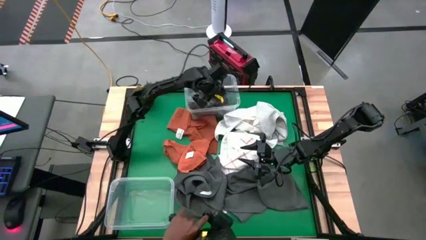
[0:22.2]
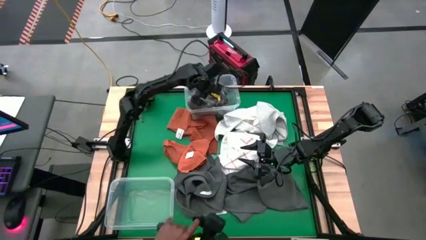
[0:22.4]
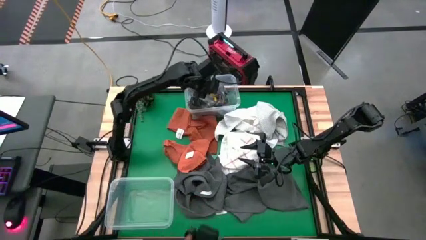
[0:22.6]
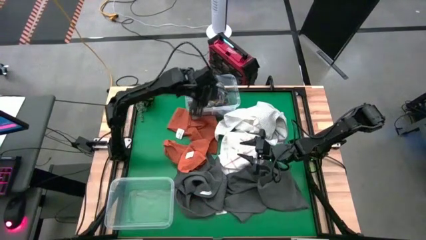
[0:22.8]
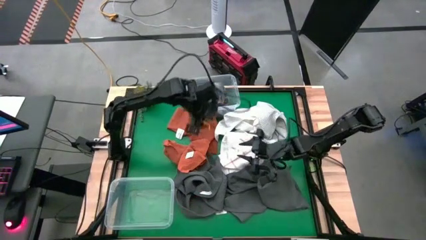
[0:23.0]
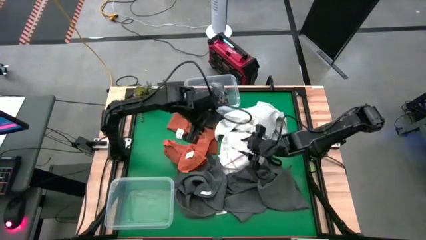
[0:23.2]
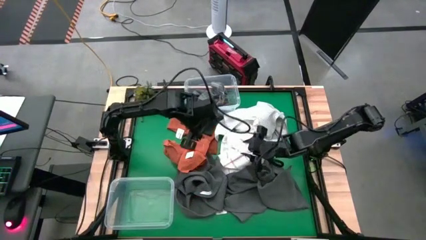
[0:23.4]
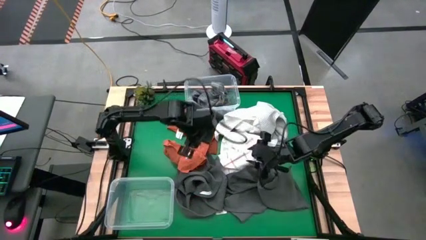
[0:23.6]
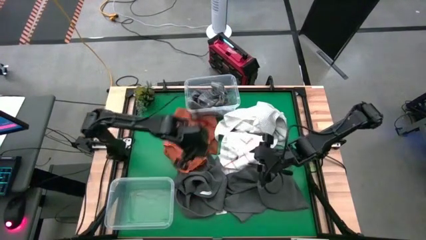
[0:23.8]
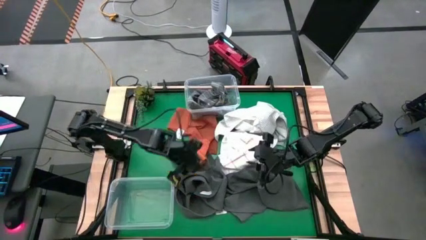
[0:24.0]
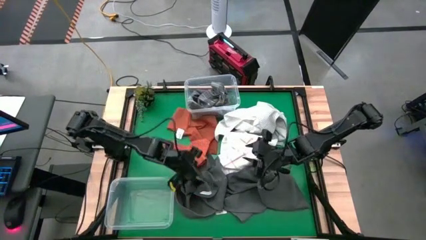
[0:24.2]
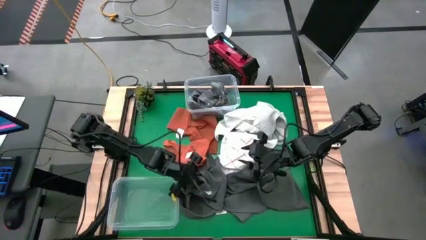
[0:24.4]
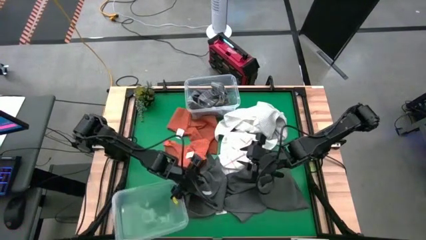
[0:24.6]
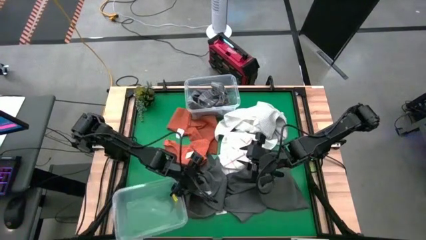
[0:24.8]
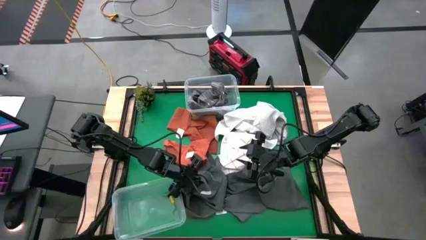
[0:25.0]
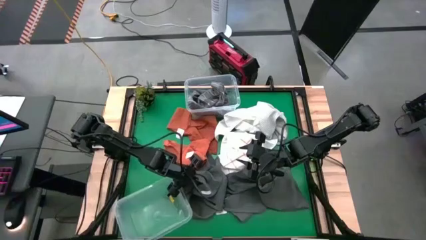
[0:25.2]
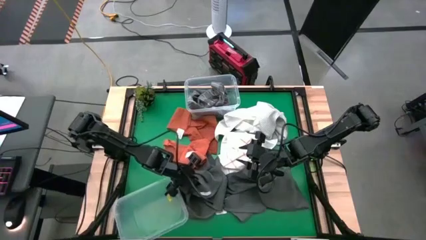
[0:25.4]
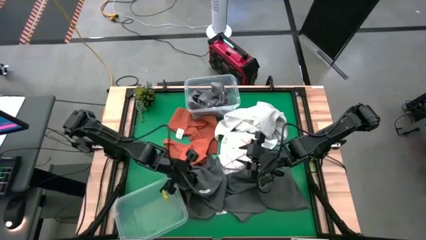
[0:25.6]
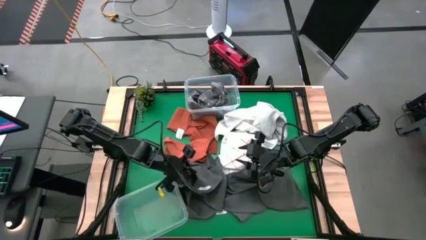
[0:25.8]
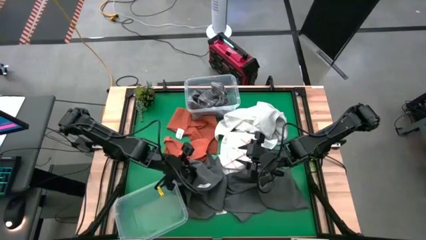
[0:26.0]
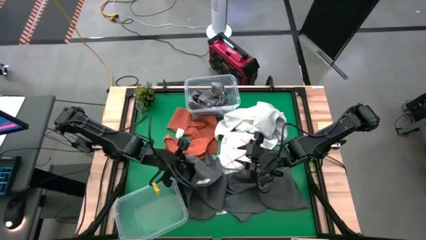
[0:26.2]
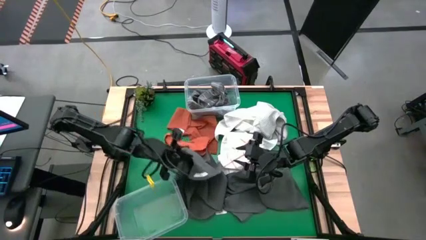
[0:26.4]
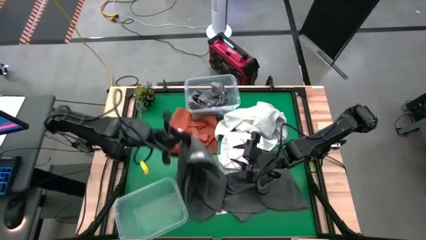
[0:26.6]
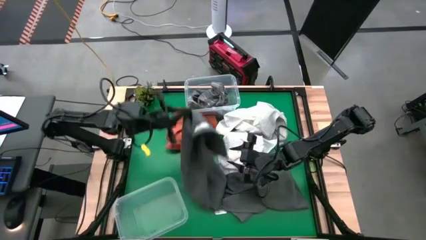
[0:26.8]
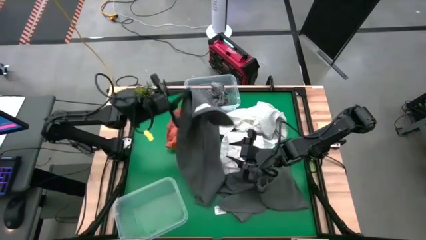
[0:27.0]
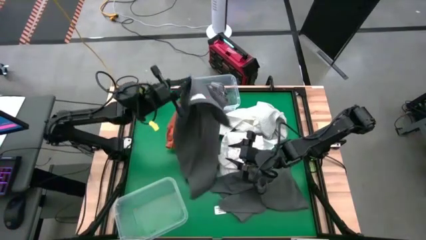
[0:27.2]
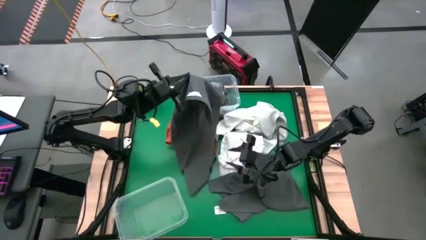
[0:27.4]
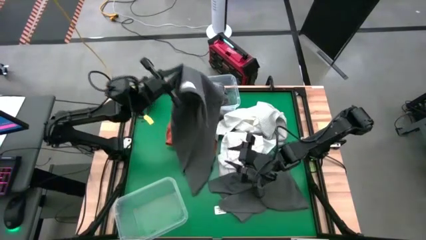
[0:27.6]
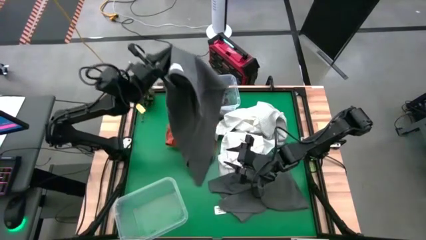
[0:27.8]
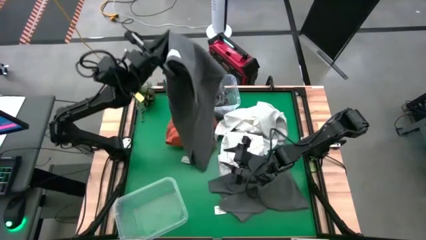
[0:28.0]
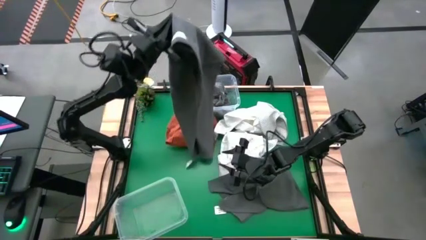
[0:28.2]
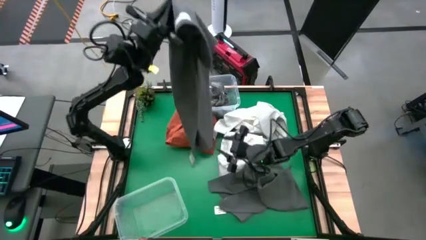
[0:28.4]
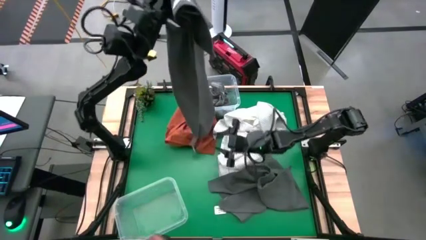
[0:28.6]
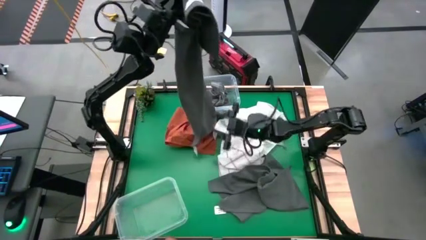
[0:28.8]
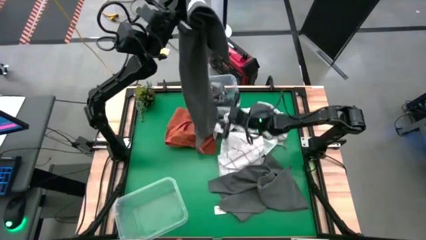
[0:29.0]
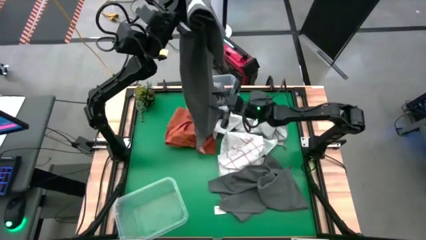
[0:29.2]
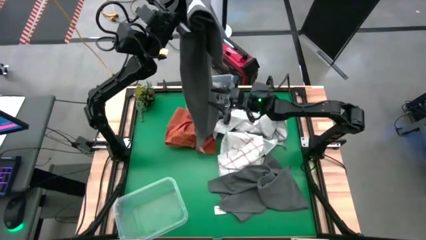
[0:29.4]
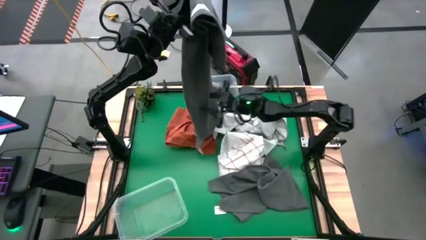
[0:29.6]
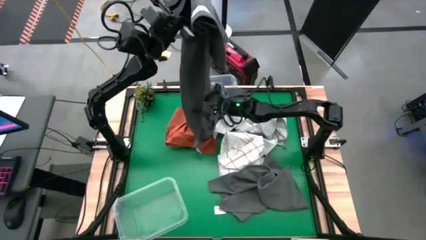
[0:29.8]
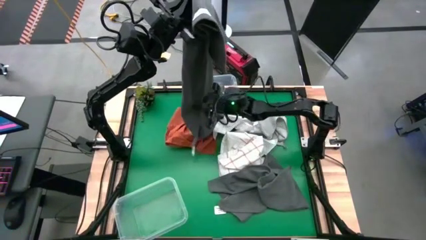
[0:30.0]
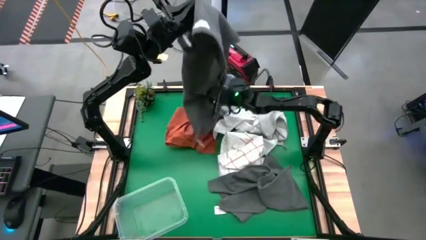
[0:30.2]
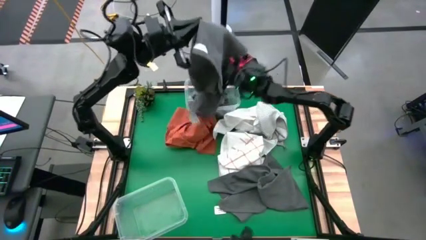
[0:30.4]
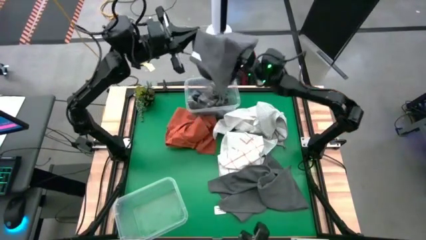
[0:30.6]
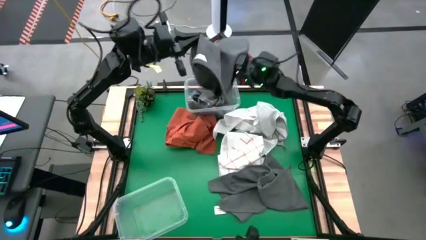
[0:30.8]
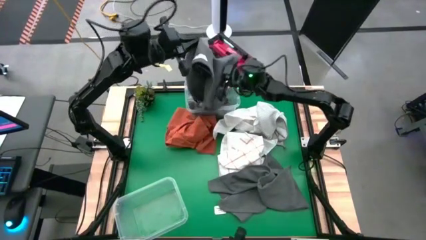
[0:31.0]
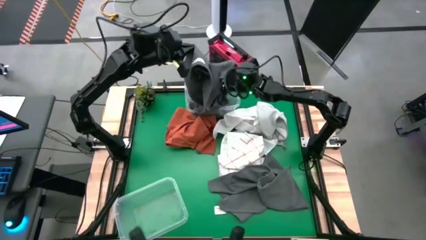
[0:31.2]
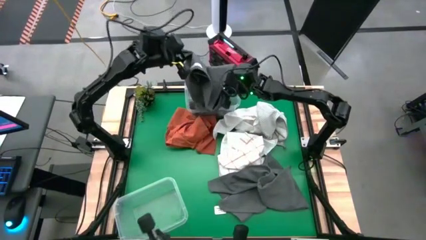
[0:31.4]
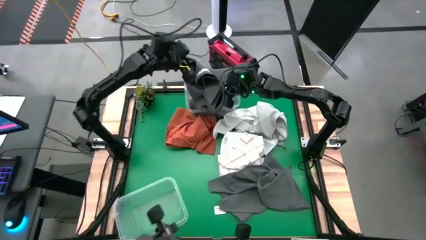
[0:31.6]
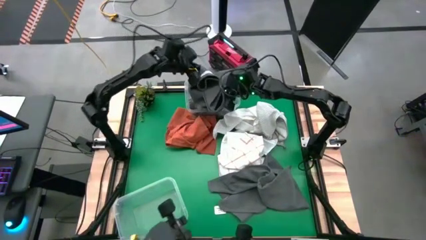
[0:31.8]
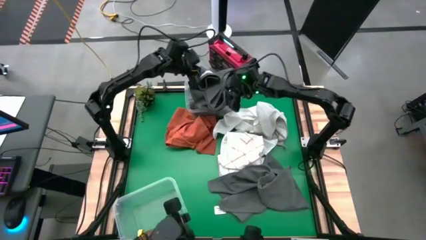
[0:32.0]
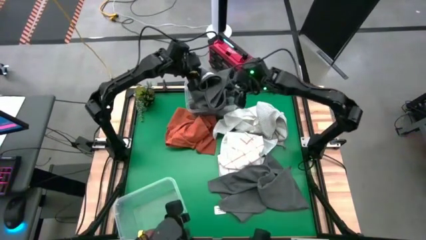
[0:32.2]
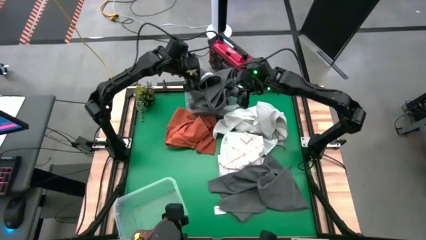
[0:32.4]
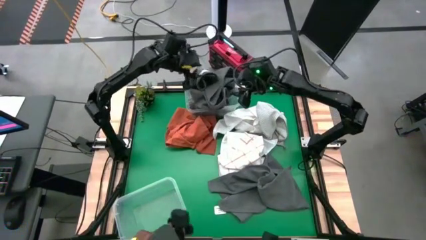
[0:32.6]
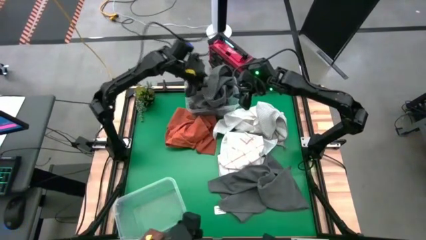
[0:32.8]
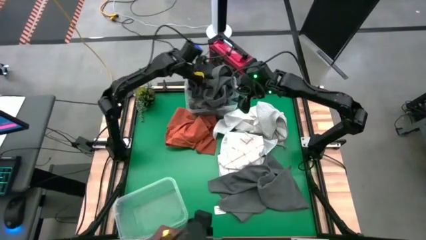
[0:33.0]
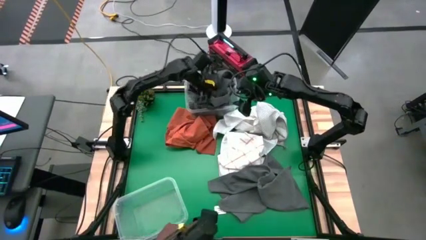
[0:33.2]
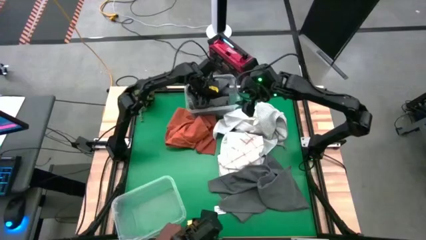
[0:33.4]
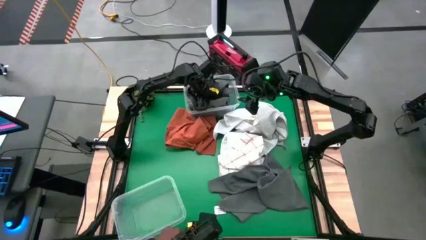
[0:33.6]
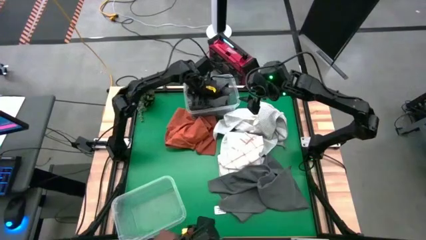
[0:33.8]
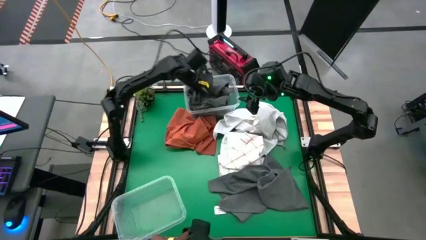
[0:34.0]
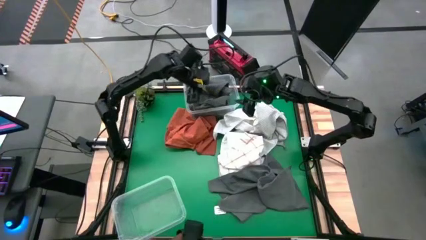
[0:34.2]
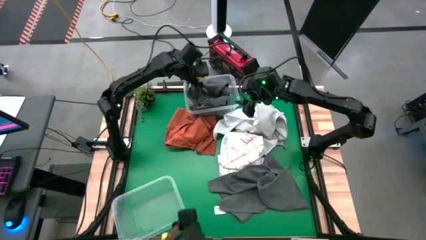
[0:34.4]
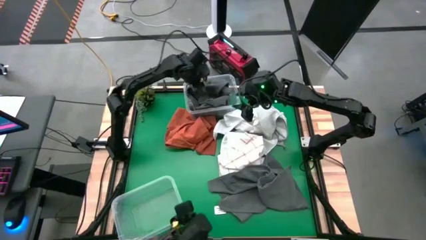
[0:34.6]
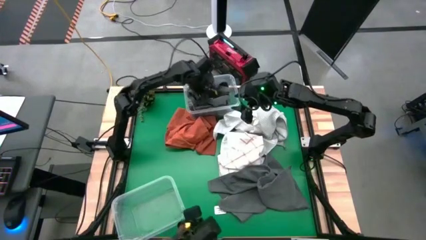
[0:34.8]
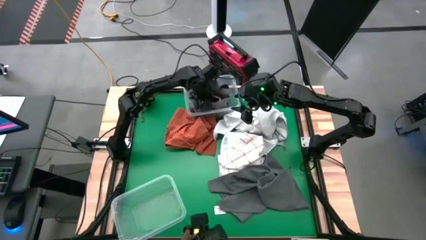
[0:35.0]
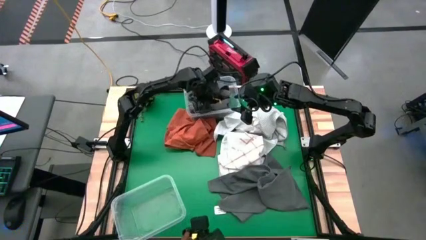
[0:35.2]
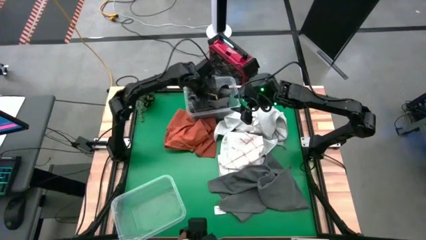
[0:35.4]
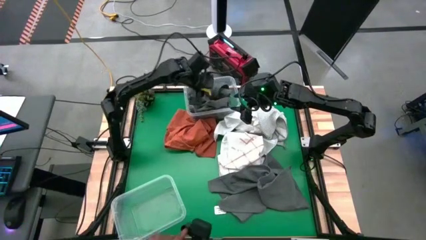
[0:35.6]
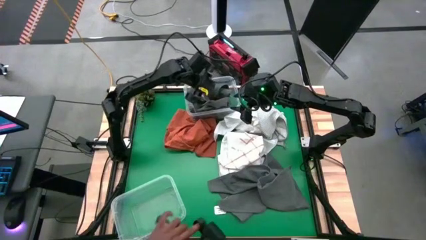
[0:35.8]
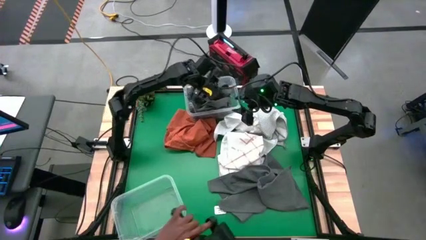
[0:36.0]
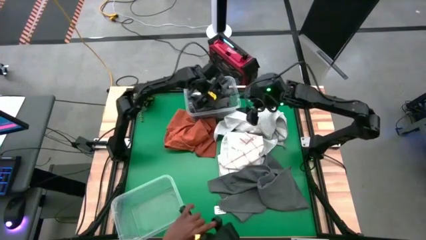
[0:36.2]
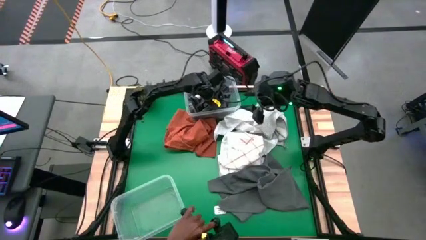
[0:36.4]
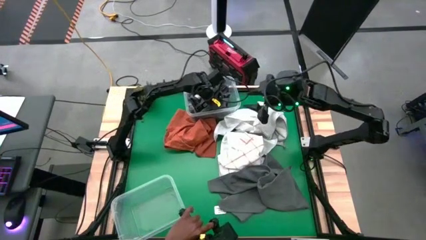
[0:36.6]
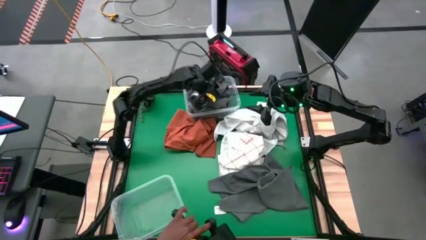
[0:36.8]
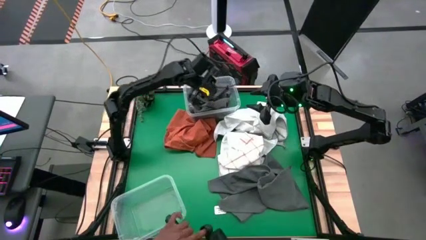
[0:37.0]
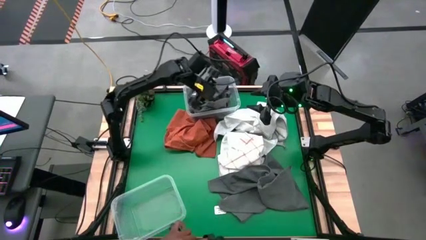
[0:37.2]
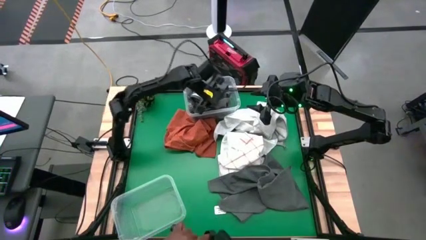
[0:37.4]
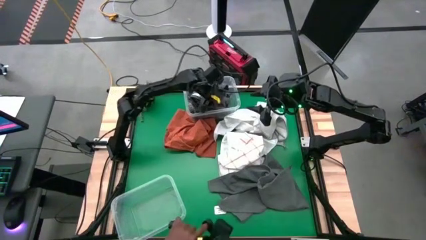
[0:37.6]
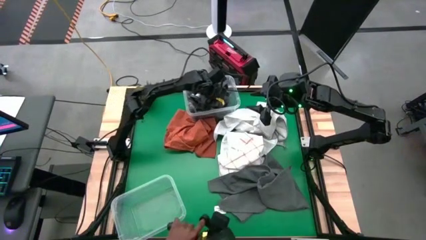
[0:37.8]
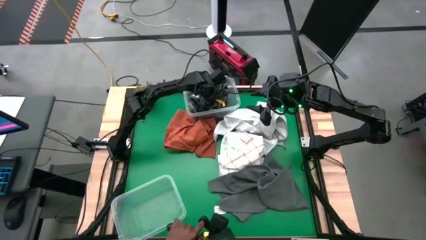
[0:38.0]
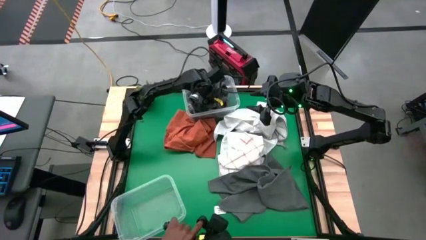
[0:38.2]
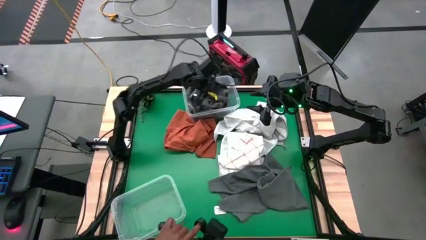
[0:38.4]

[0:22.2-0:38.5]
Task: Sort towels by color in basket
Put the left gray towel into the top transparent bin
